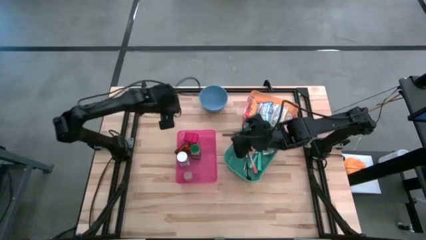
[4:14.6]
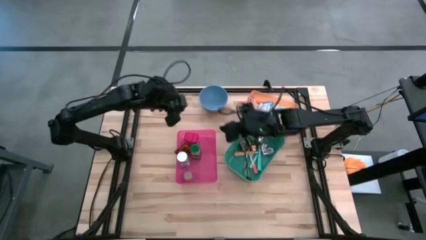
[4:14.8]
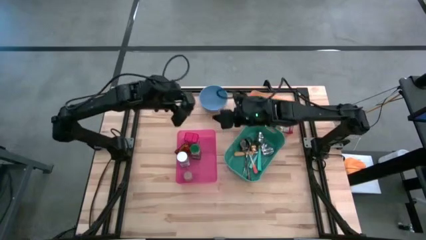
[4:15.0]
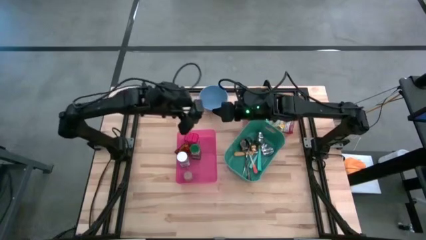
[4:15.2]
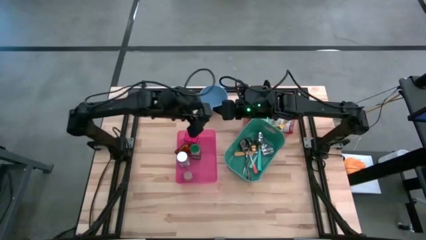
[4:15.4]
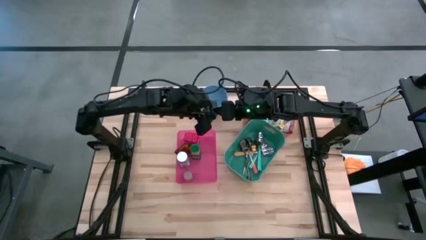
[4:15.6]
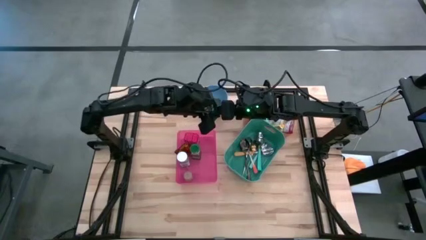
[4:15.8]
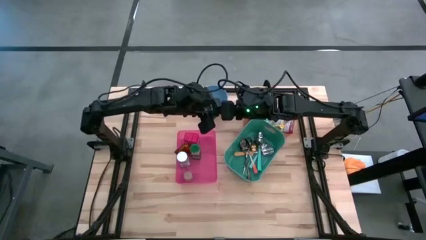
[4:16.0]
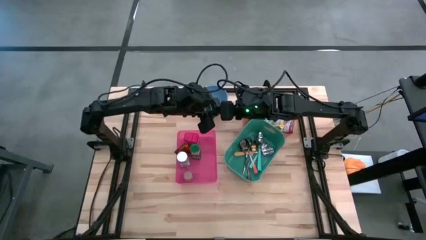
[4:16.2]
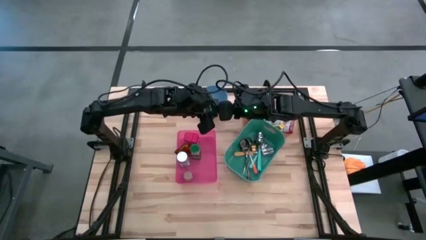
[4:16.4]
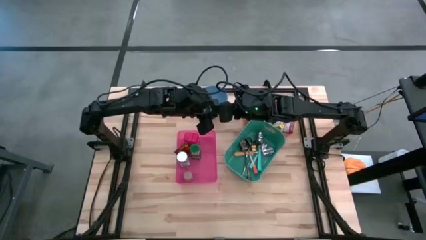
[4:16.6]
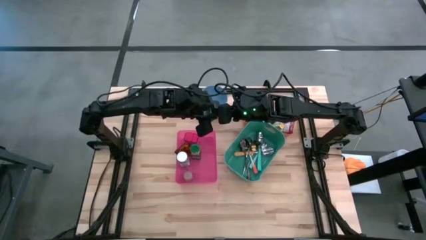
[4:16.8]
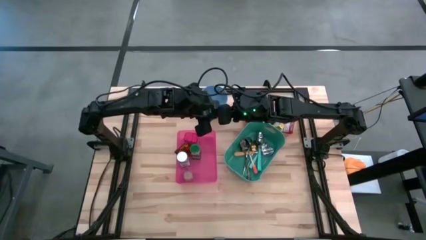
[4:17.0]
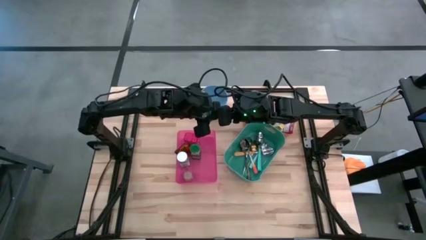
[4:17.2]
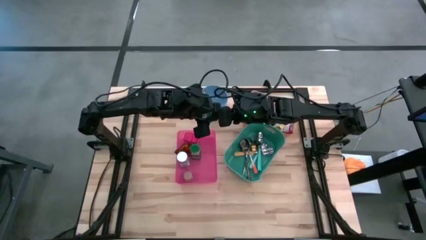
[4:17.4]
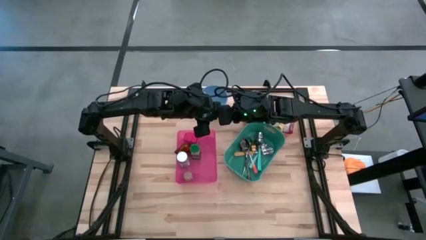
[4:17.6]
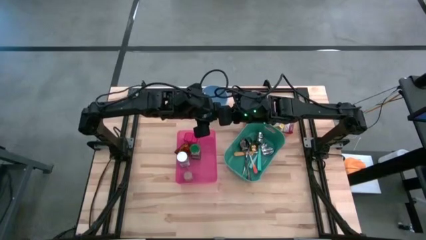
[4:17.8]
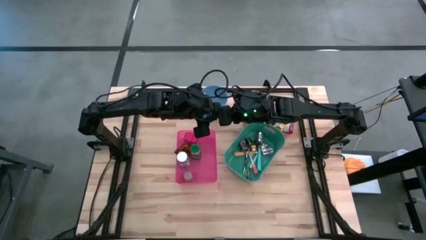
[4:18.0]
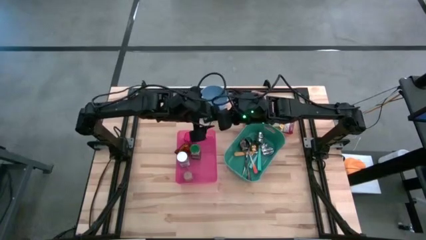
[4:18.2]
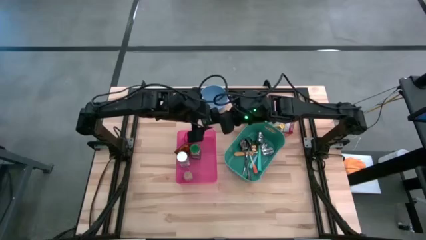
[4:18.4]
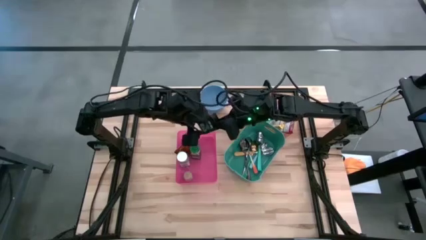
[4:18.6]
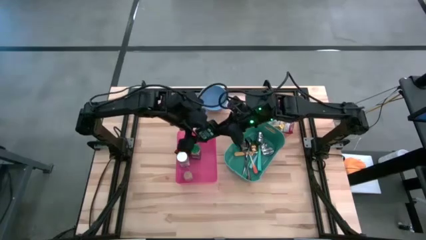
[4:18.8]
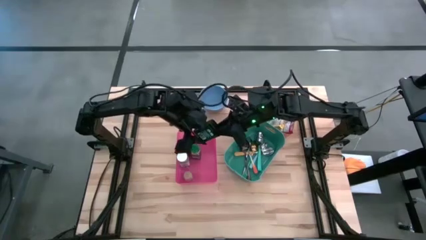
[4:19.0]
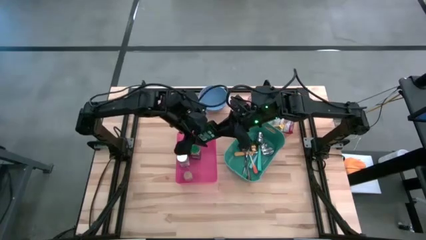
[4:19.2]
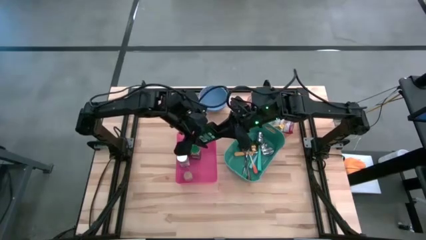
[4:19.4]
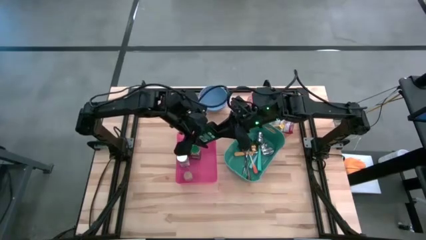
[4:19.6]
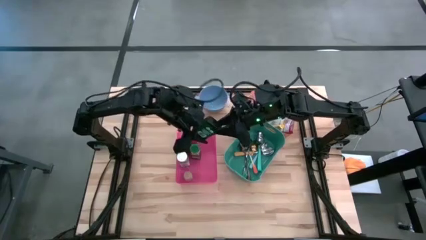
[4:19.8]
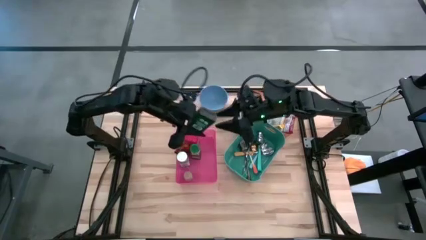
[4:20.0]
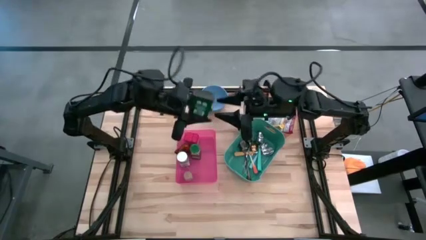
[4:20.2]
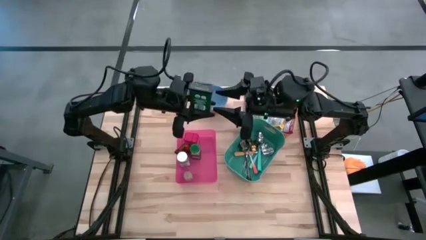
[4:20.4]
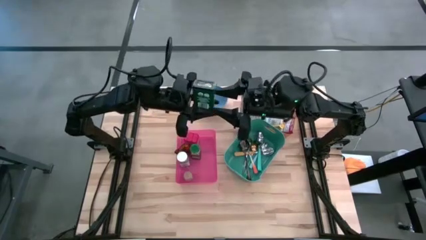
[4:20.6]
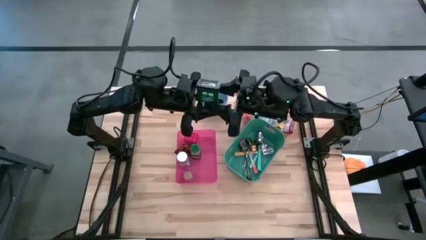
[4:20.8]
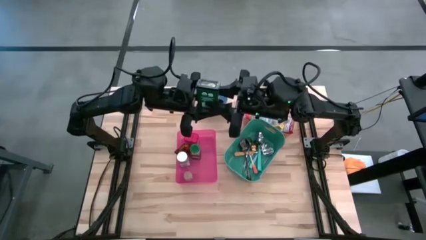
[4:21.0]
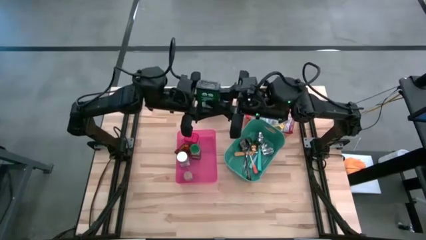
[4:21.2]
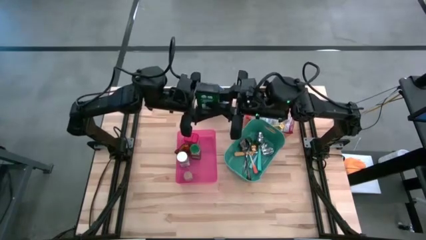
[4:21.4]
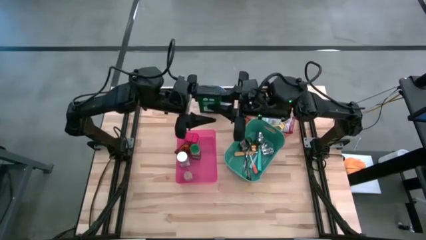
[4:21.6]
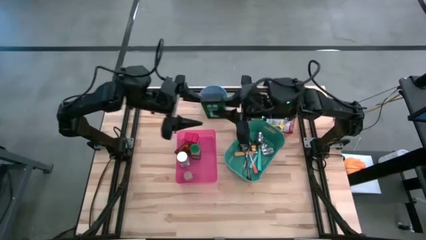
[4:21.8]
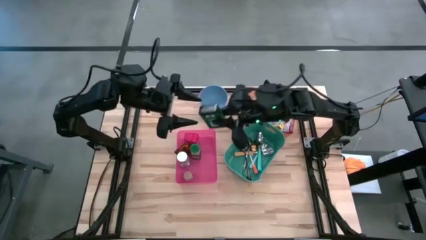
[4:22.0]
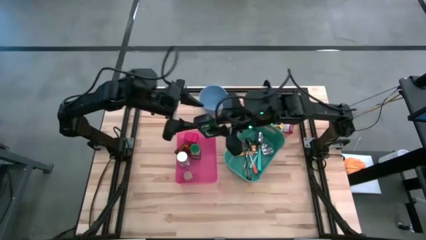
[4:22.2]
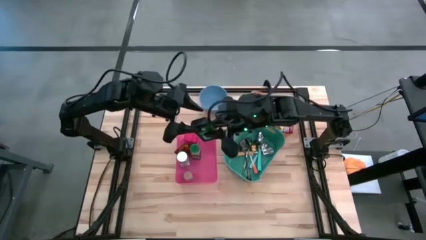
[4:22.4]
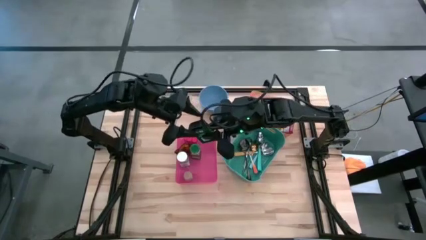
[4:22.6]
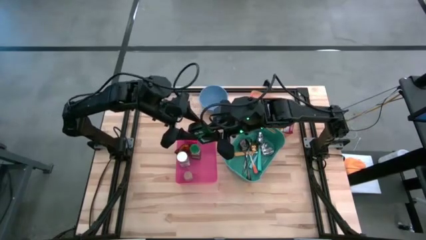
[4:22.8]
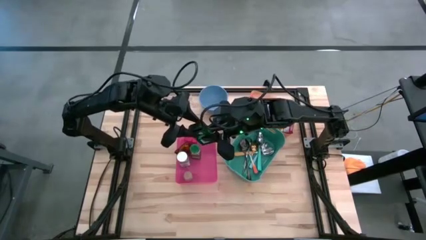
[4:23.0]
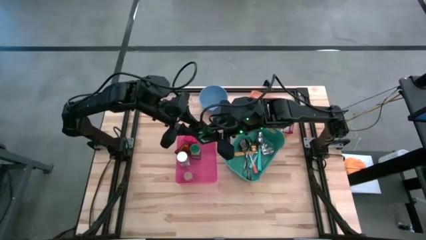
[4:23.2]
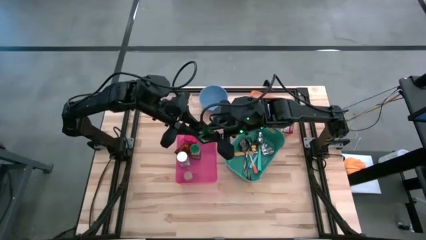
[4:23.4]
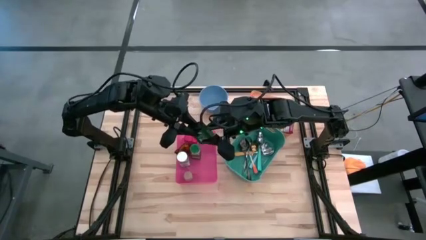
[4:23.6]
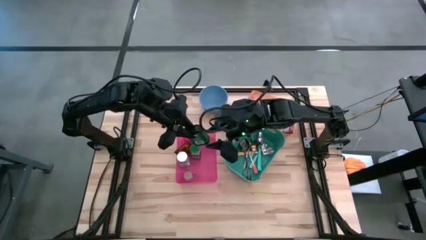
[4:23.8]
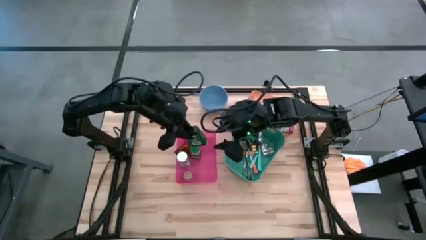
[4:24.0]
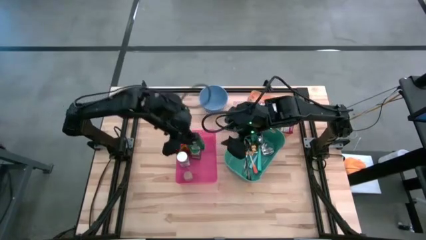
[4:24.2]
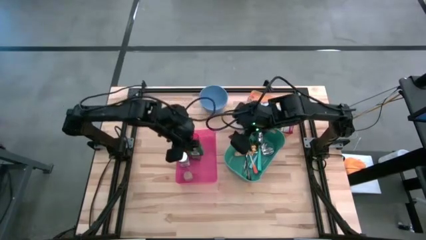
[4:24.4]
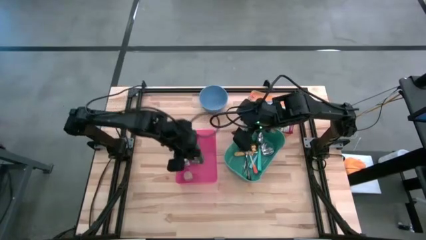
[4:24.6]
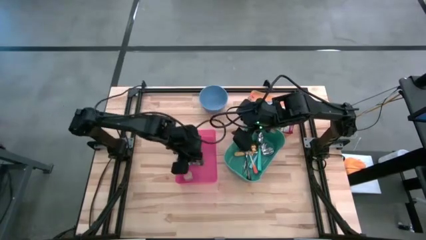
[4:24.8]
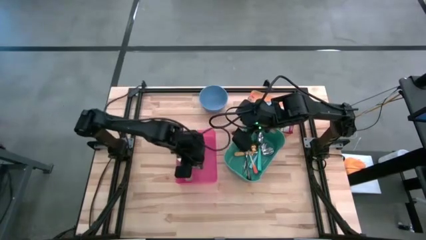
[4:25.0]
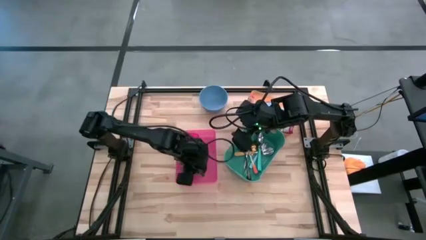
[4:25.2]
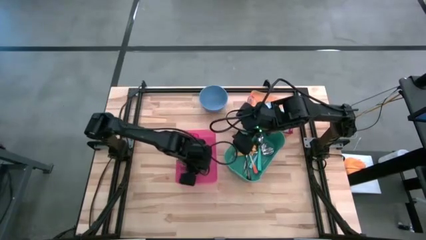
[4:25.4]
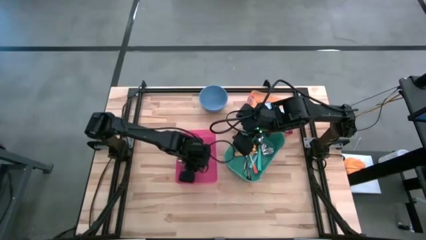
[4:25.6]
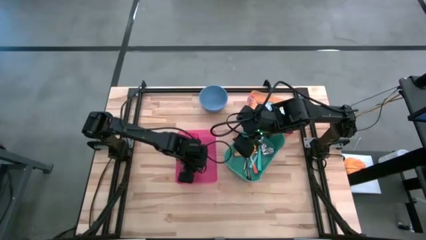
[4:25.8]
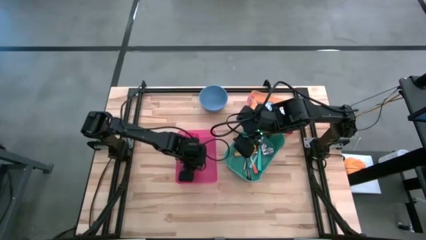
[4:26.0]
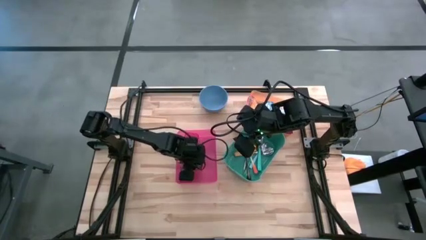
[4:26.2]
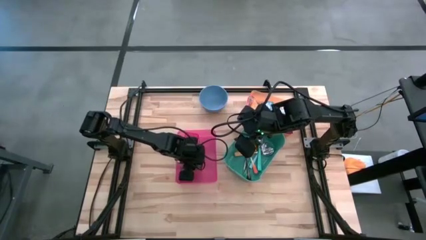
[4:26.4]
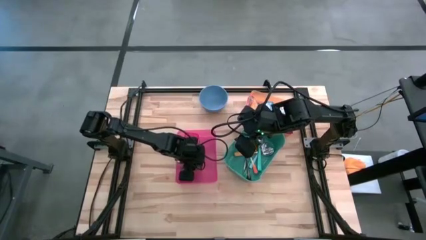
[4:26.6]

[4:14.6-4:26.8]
Put the black spice can into the red bin

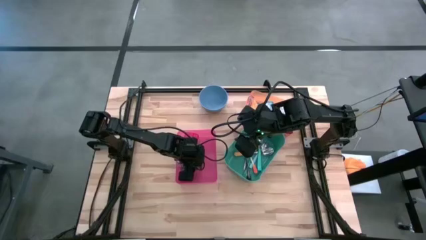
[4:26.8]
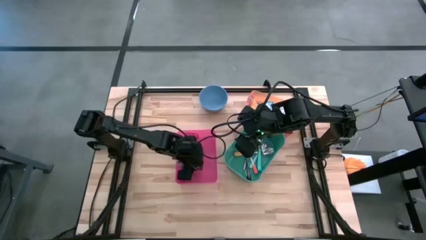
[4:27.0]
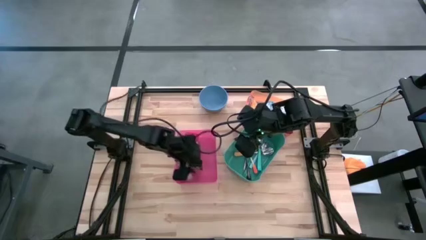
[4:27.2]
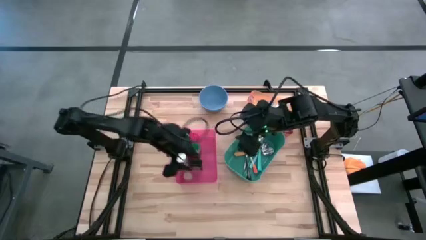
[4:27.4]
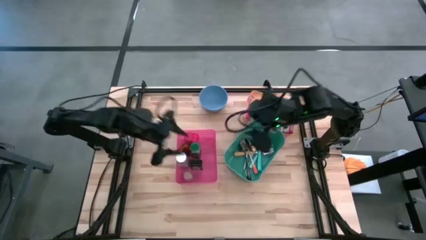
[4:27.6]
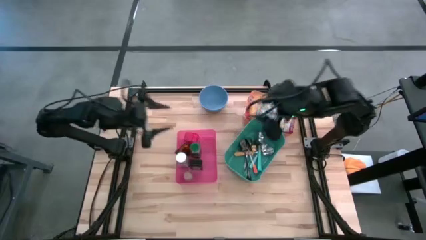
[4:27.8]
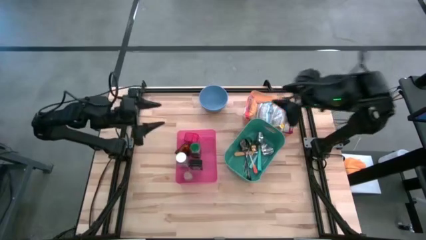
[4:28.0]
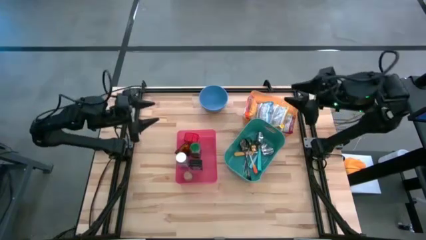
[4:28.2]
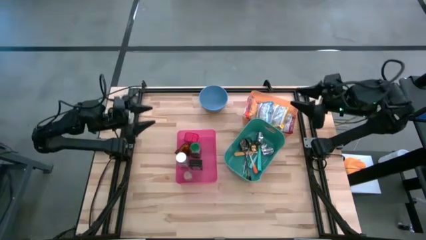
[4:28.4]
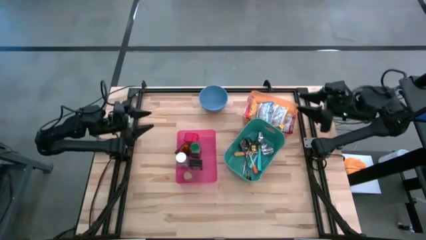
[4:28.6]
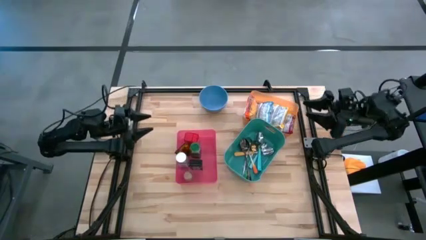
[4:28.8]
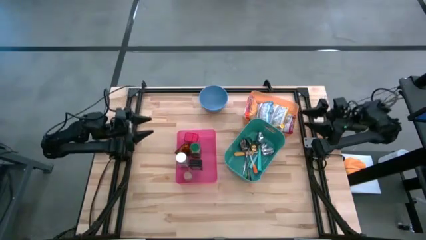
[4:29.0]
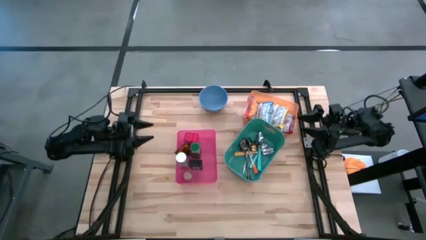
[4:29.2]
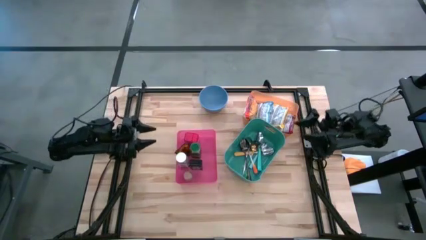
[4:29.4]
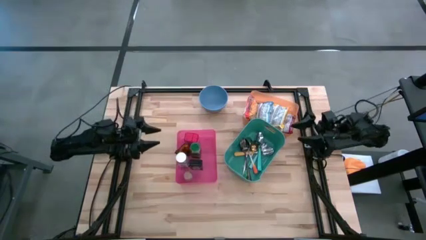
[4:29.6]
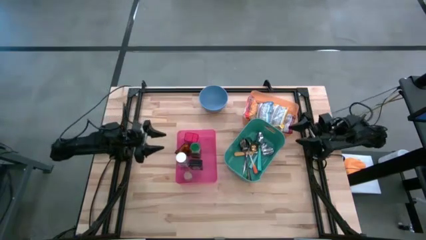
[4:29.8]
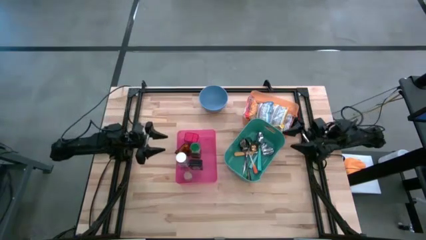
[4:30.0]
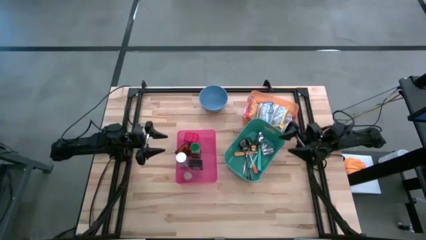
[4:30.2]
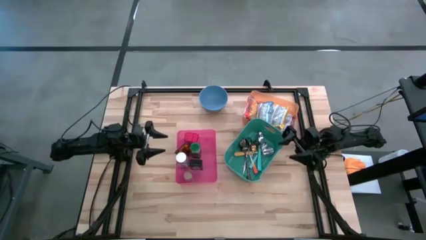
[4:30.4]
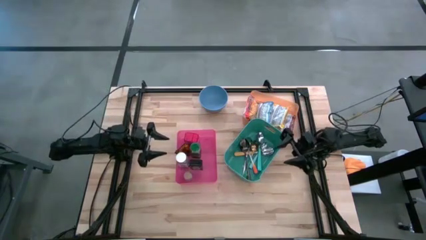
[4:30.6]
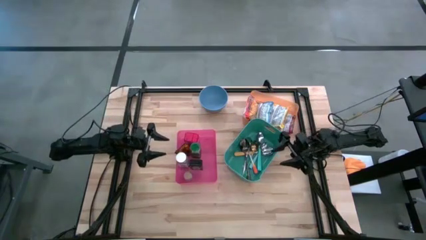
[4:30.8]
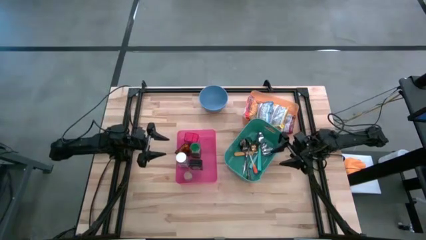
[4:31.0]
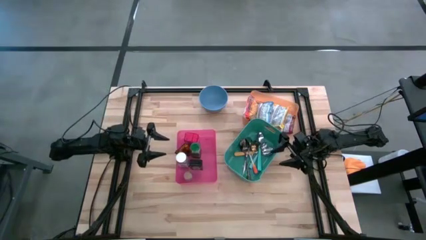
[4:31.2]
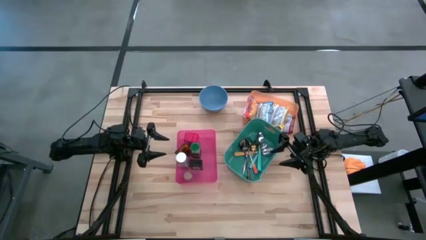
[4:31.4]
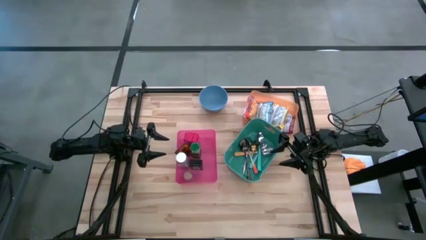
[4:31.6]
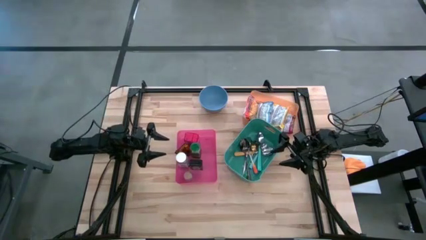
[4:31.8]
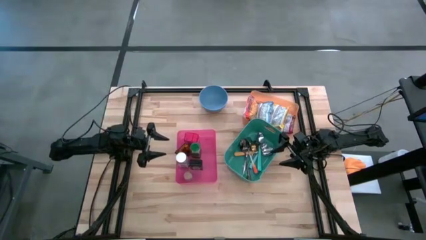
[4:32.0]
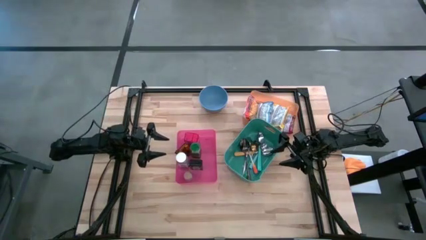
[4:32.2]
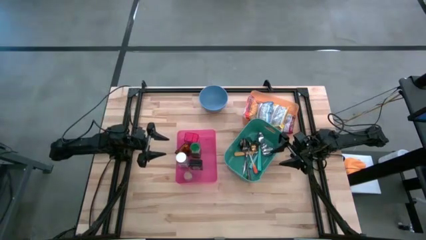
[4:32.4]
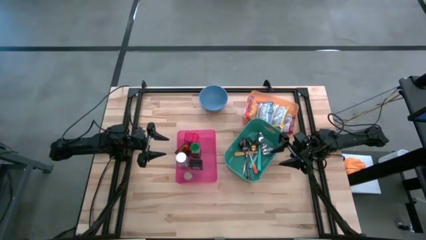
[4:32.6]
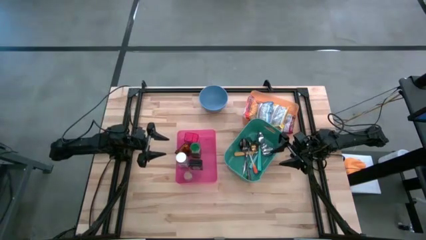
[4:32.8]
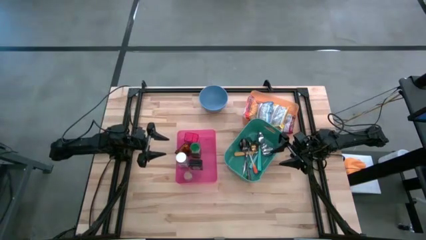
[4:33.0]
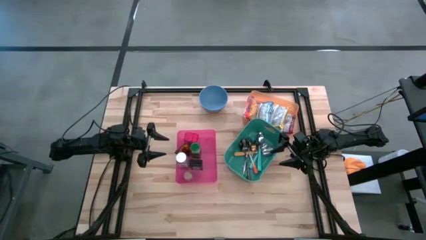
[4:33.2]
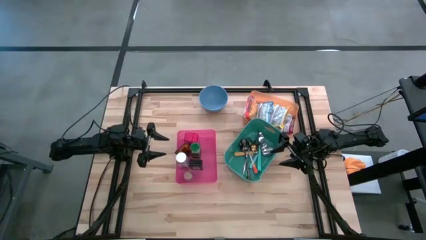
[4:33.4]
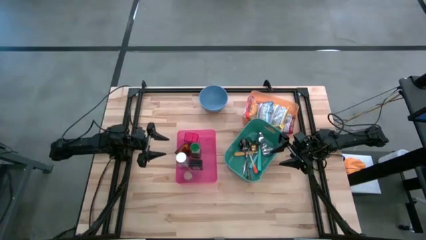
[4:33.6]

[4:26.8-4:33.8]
Return to Home Position
